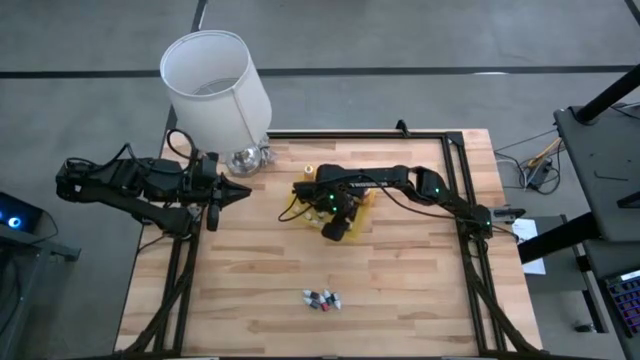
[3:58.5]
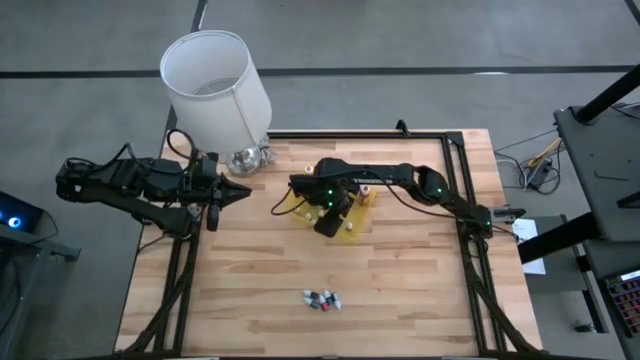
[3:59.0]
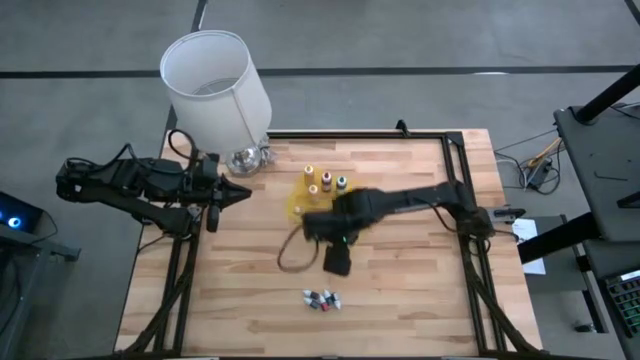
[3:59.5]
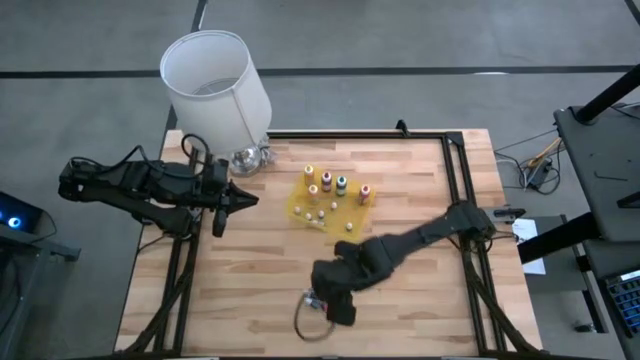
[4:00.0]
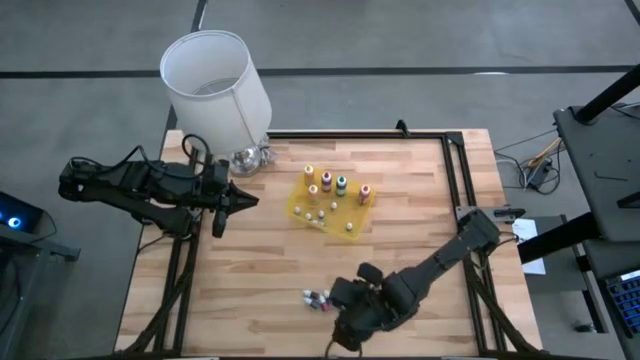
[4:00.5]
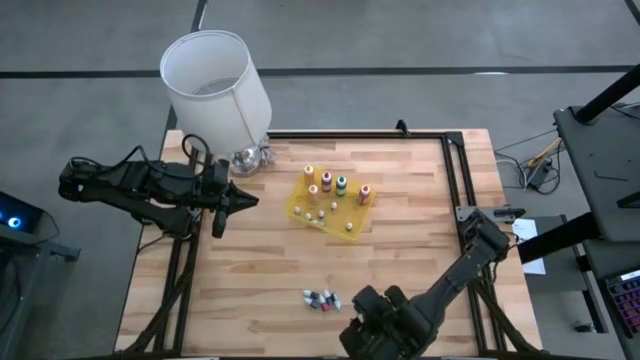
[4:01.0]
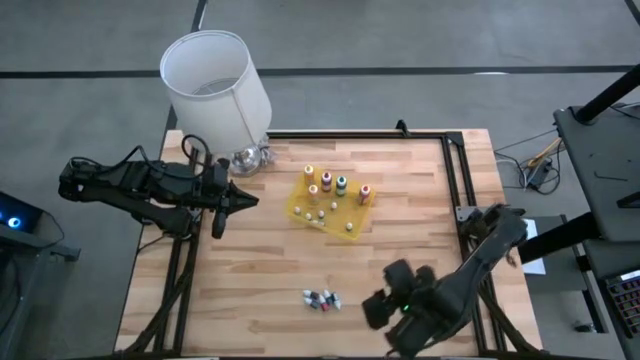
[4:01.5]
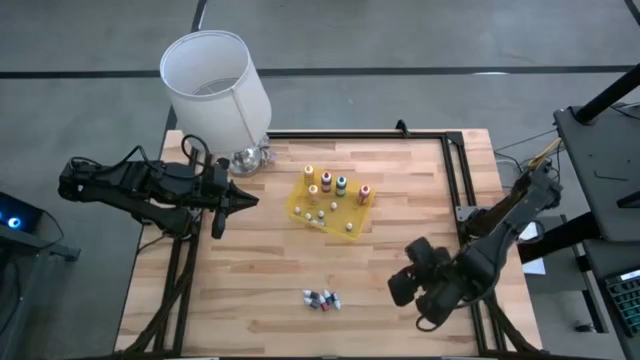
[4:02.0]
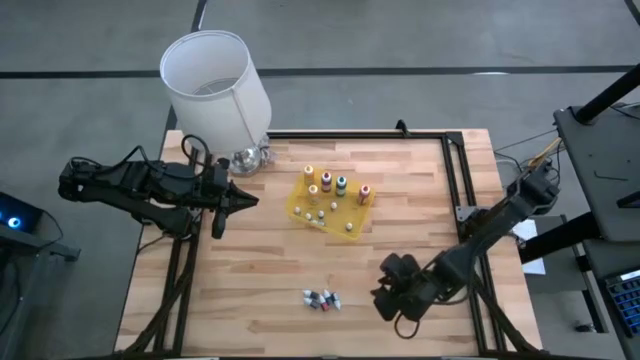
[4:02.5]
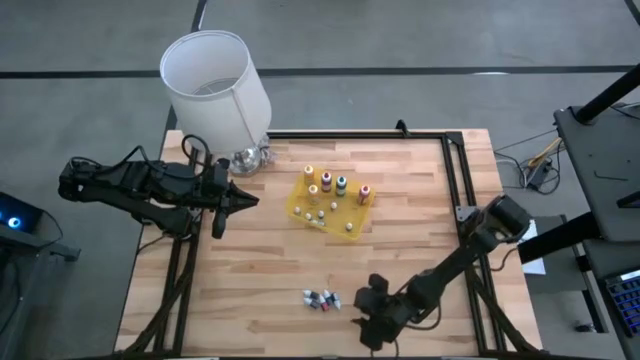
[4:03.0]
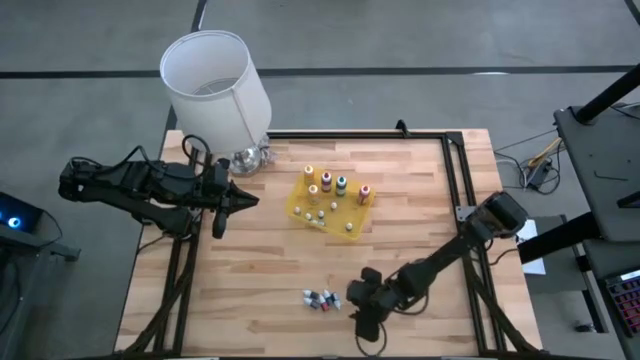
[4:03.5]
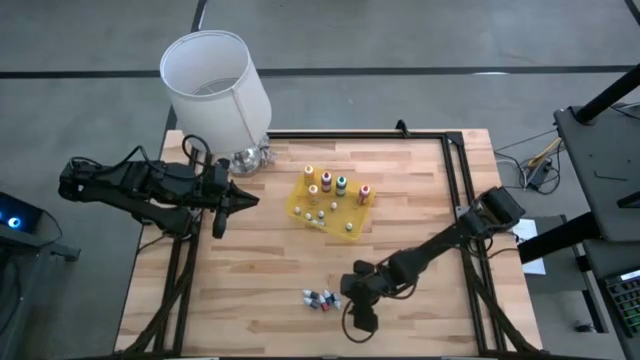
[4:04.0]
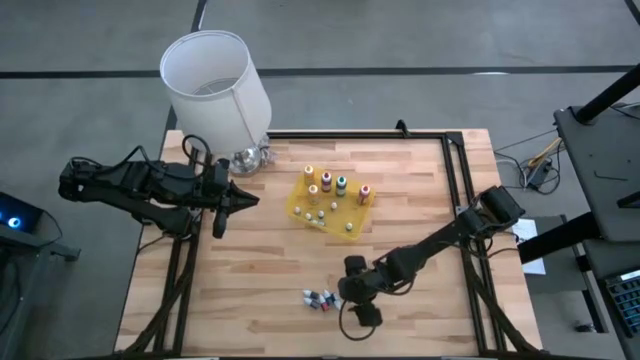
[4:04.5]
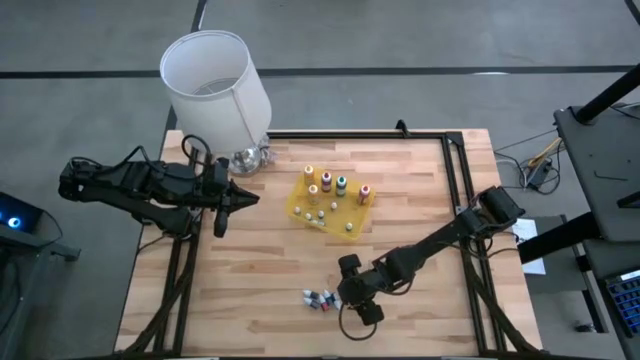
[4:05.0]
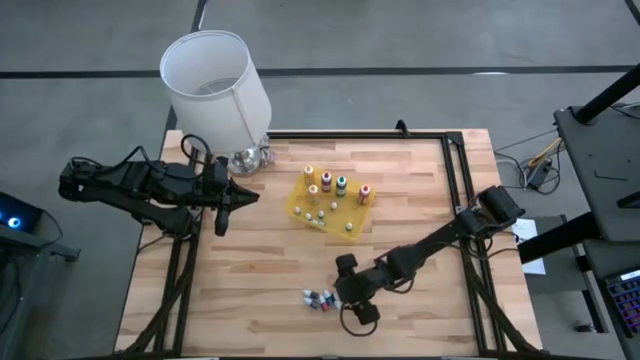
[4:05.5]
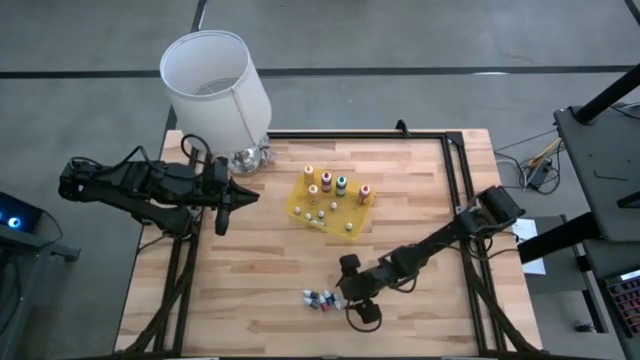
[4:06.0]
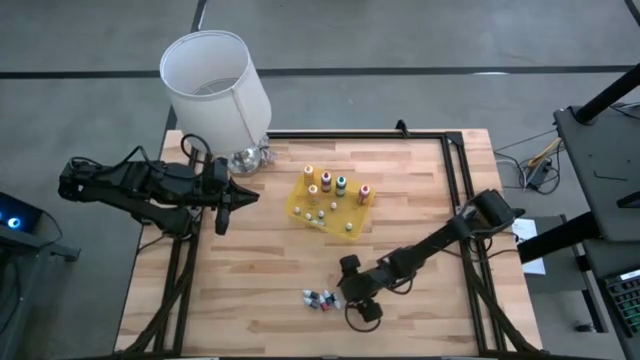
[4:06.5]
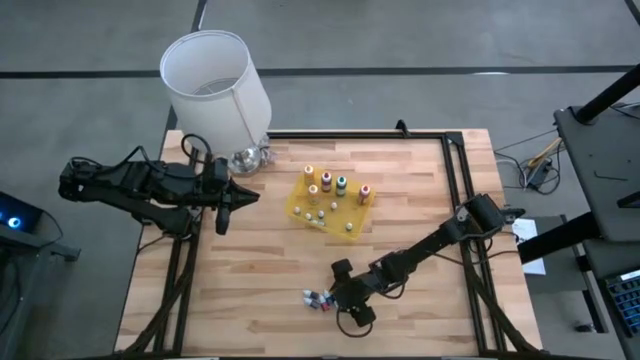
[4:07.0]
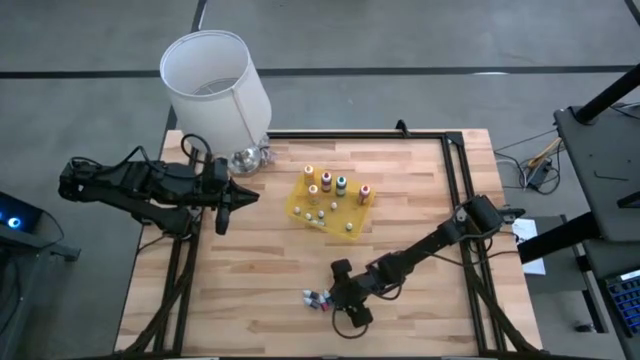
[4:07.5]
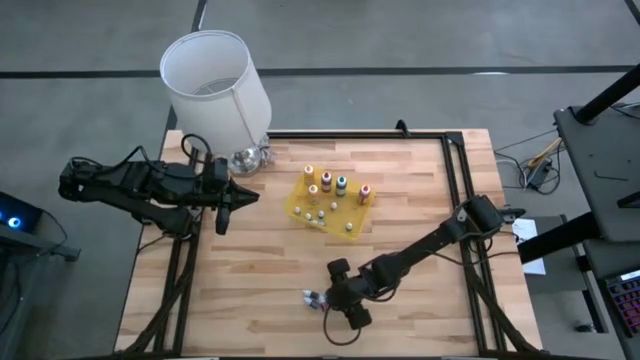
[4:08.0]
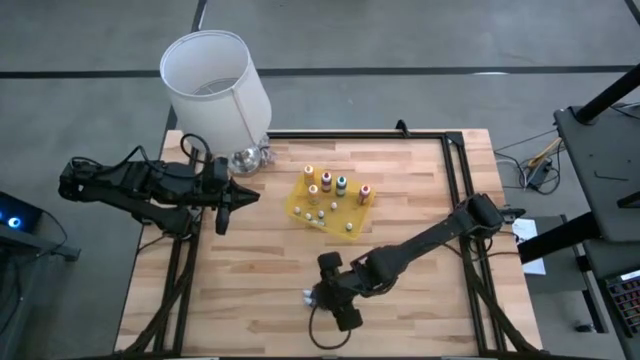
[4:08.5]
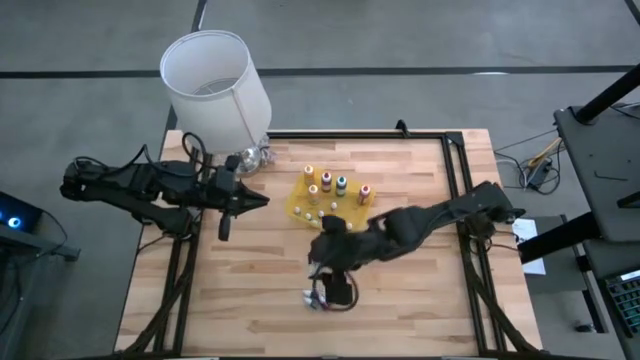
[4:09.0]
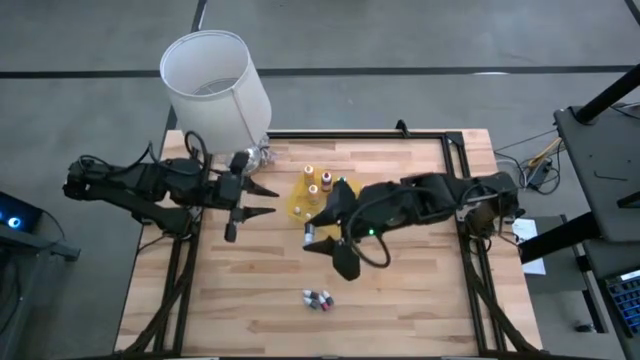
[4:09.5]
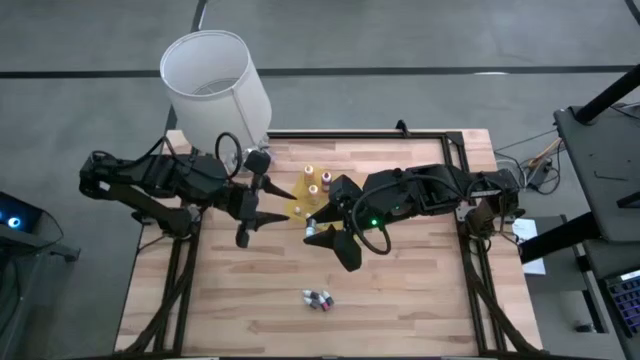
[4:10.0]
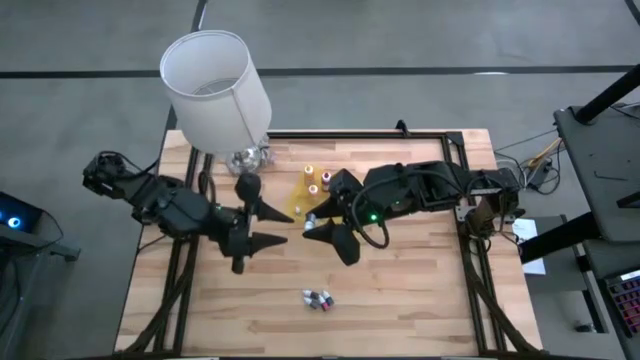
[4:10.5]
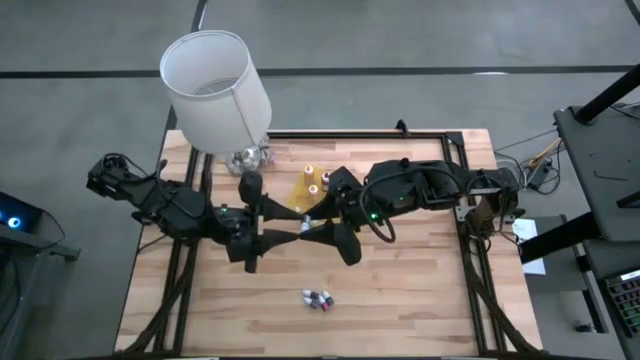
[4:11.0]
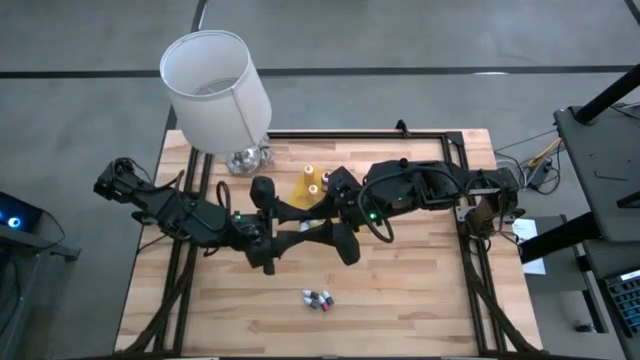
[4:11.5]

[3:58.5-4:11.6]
Task: Pick & Place food coloring
Put the small green food coloring bottle into the yellow bin

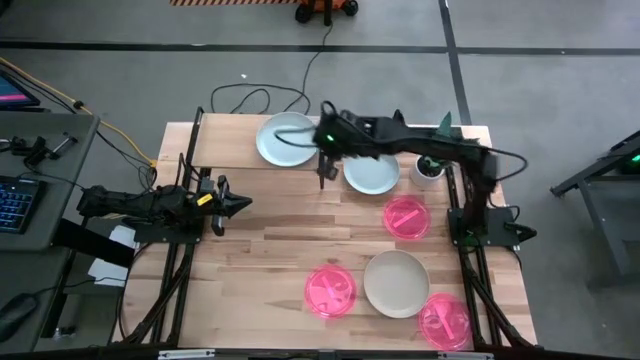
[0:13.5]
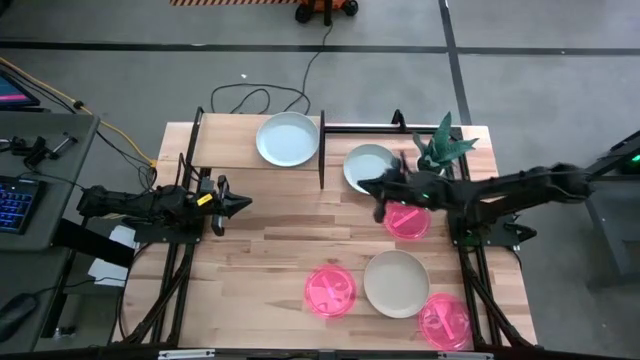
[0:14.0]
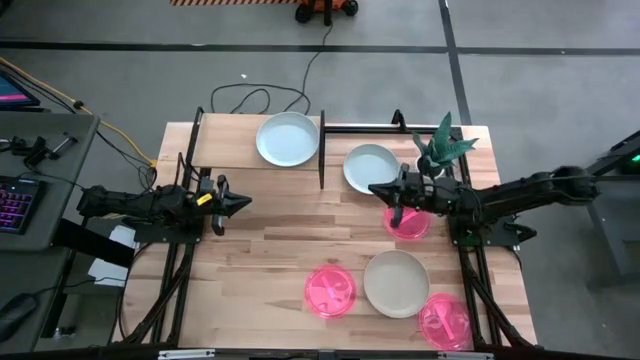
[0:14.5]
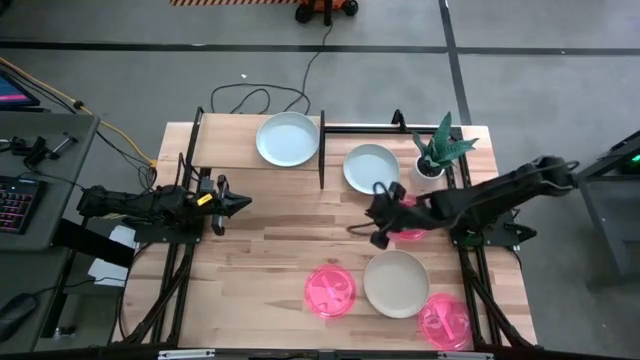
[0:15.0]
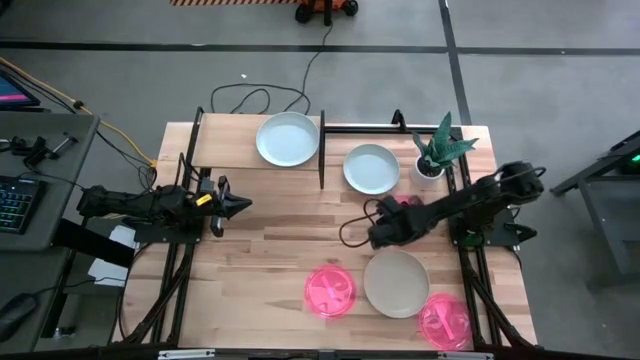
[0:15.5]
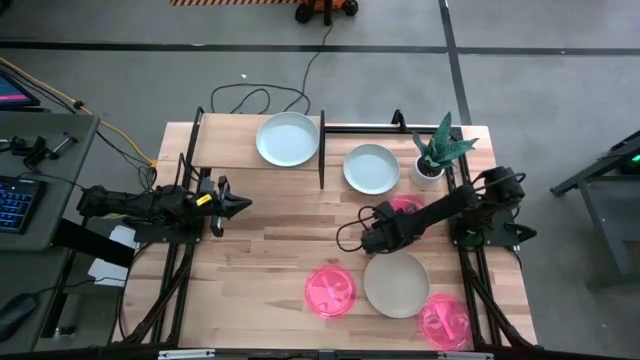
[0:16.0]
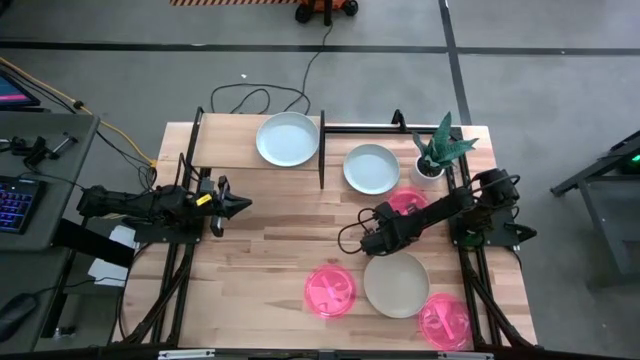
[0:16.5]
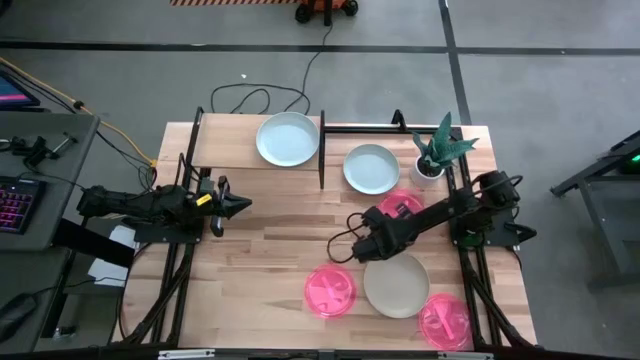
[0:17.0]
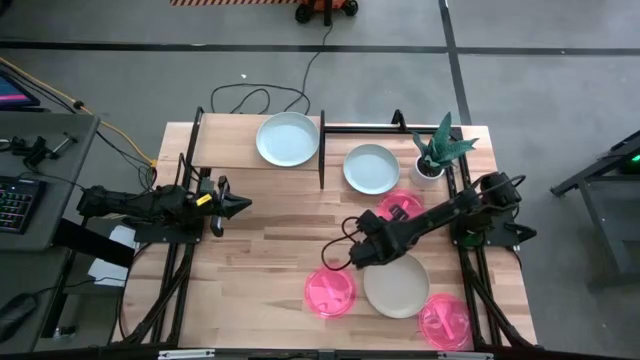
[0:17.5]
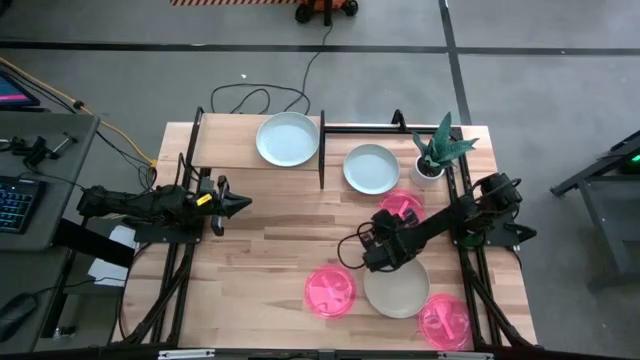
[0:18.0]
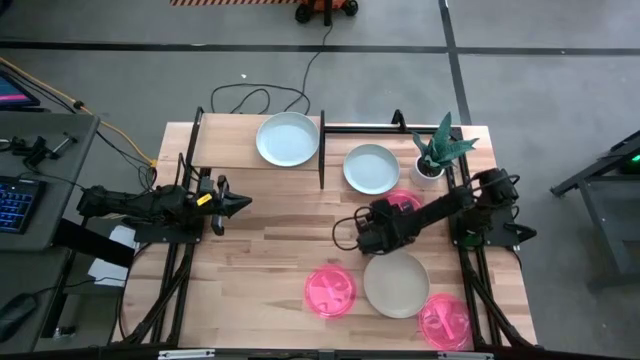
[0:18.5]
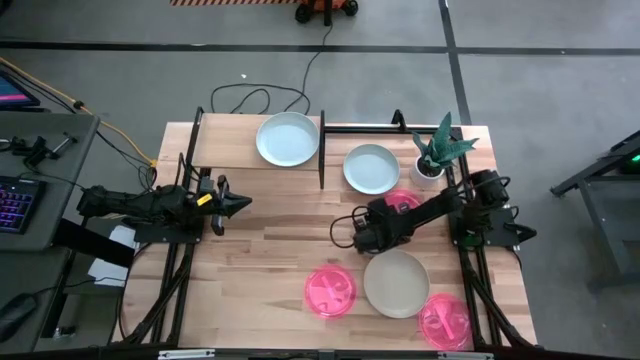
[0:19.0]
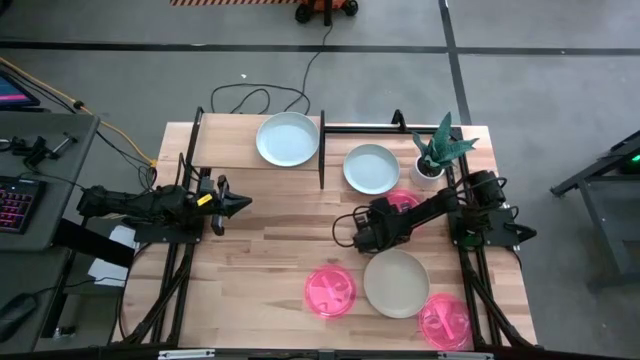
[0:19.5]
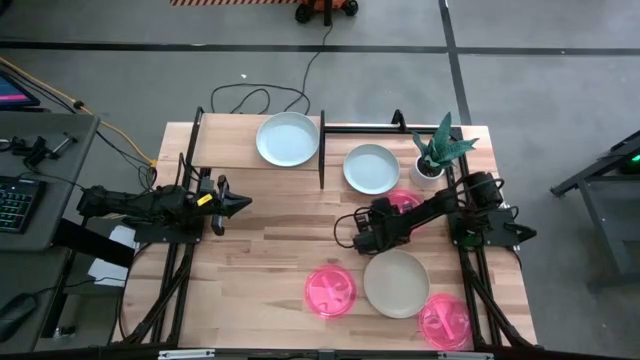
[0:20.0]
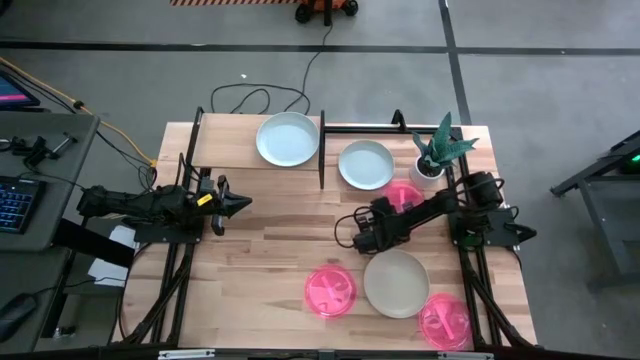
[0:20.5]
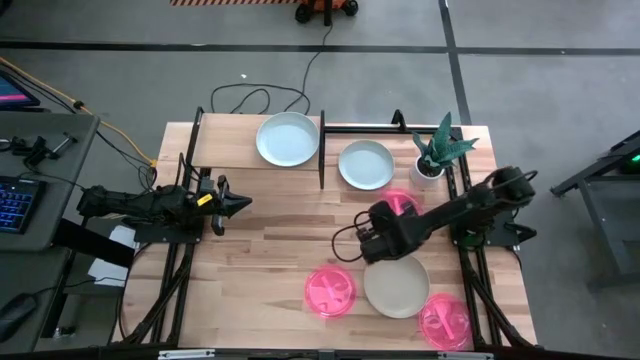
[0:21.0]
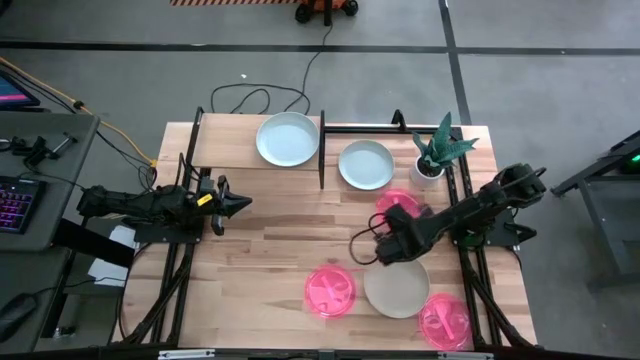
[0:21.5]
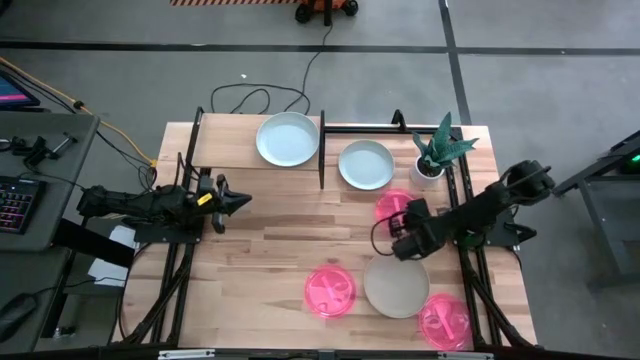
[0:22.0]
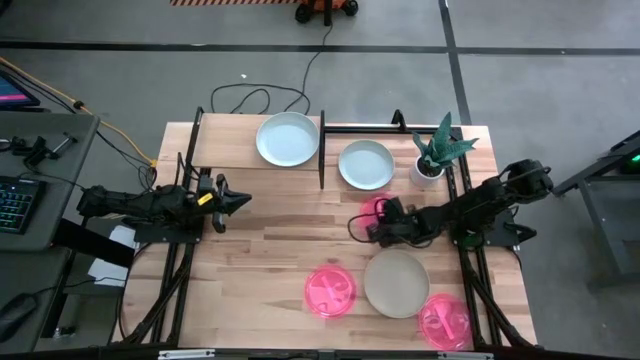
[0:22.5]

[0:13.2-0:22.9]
Task: Place and stack plates onto a shelf
Put the top center transparent pink plate on the shelf
